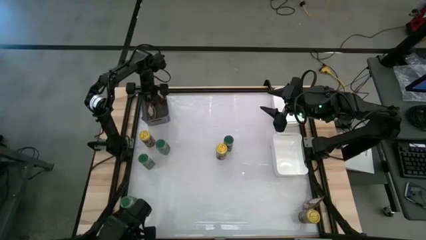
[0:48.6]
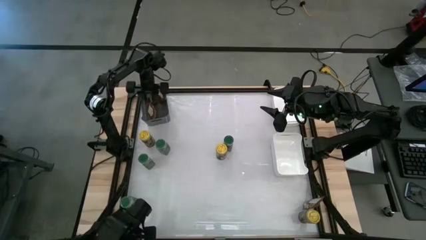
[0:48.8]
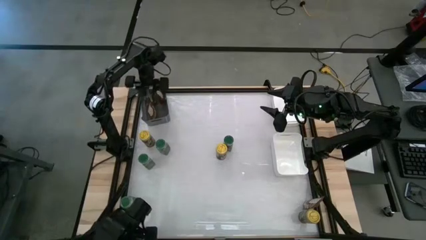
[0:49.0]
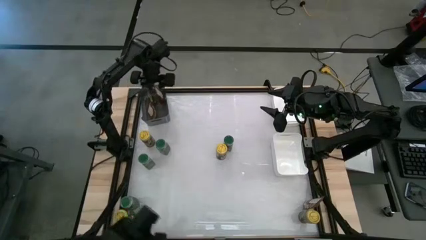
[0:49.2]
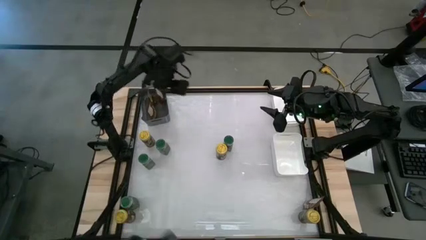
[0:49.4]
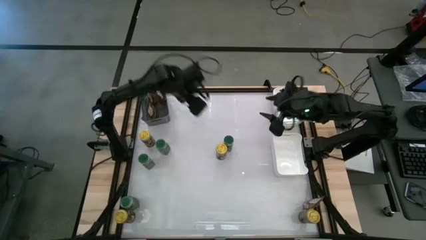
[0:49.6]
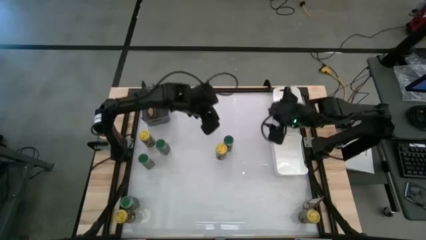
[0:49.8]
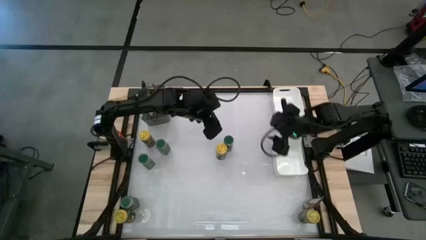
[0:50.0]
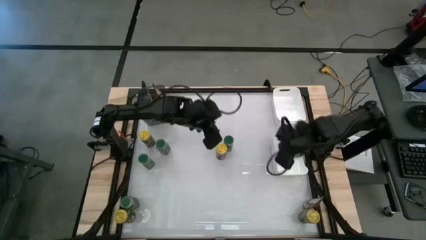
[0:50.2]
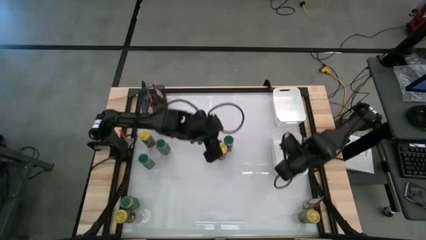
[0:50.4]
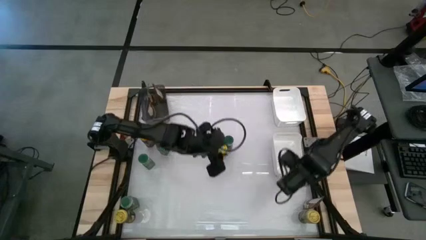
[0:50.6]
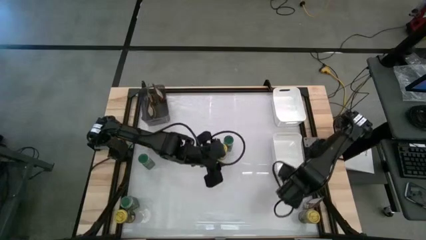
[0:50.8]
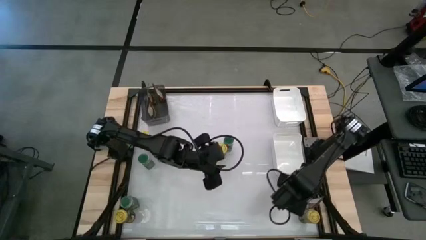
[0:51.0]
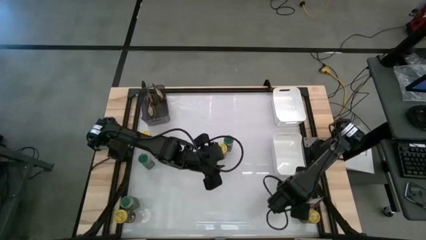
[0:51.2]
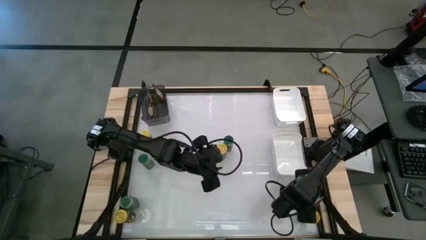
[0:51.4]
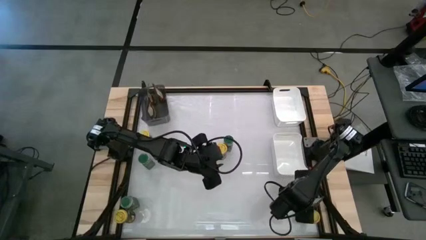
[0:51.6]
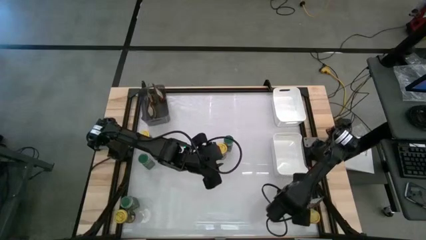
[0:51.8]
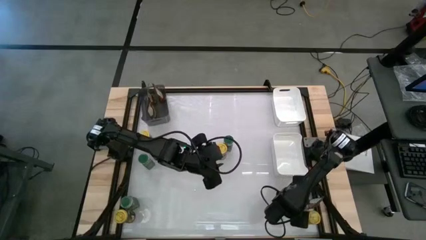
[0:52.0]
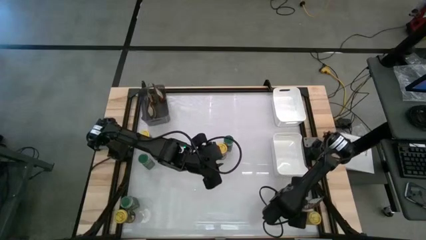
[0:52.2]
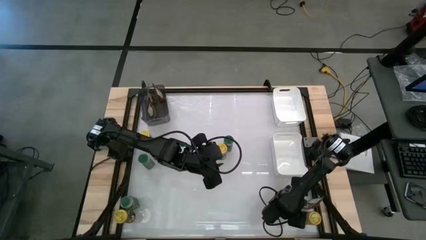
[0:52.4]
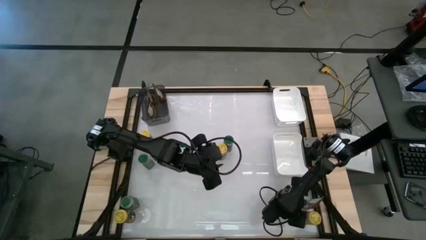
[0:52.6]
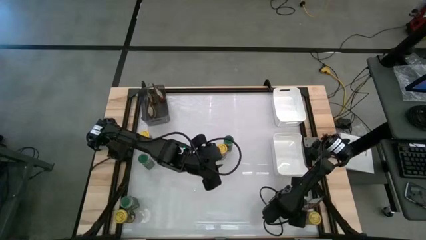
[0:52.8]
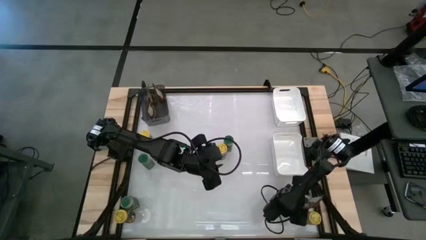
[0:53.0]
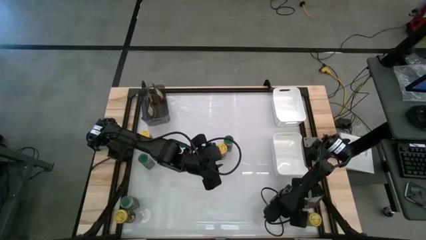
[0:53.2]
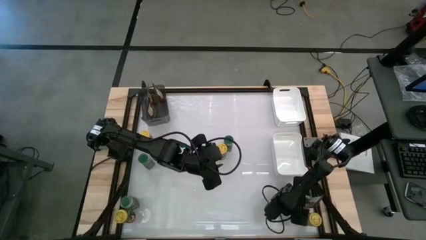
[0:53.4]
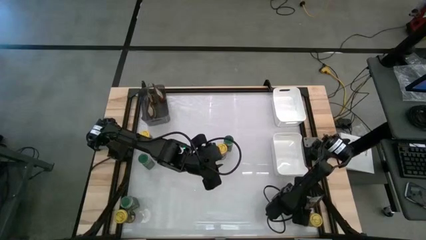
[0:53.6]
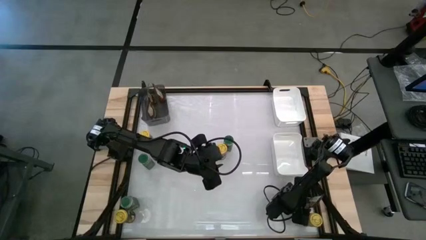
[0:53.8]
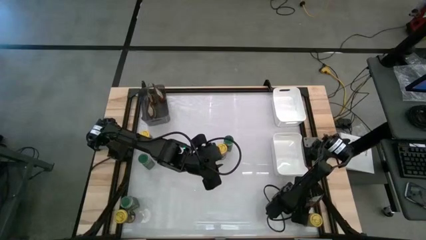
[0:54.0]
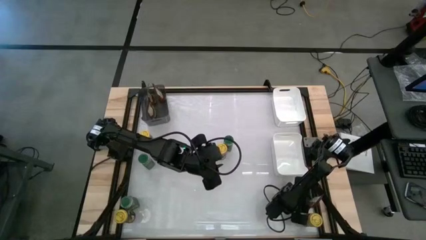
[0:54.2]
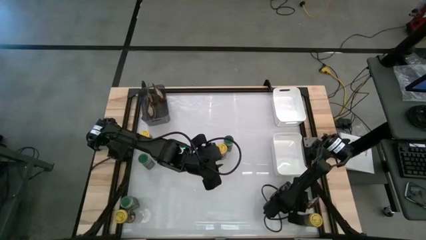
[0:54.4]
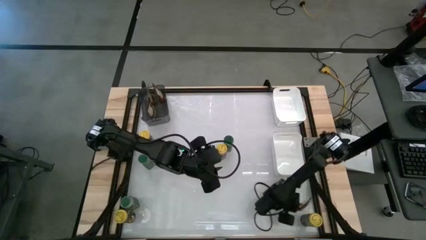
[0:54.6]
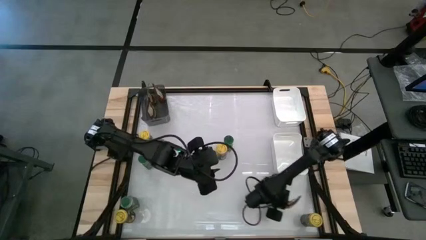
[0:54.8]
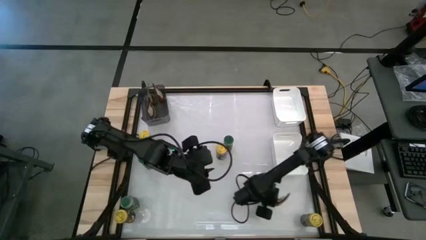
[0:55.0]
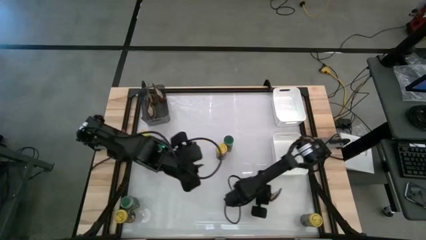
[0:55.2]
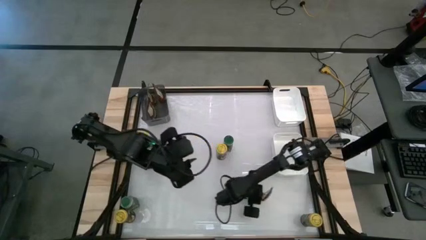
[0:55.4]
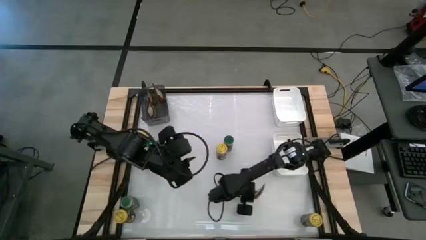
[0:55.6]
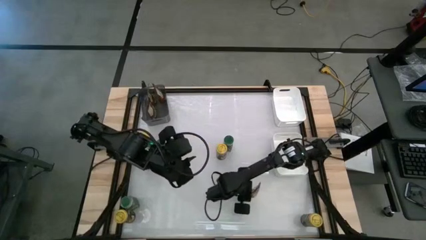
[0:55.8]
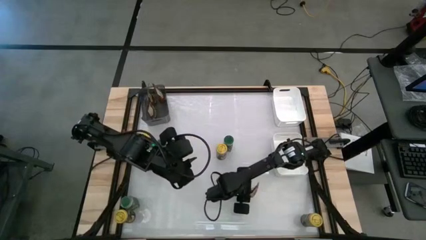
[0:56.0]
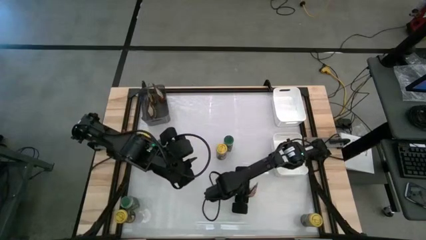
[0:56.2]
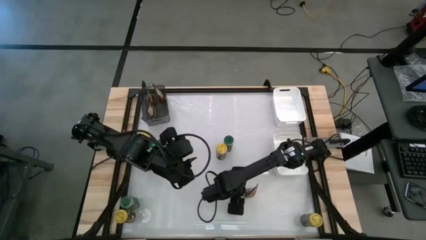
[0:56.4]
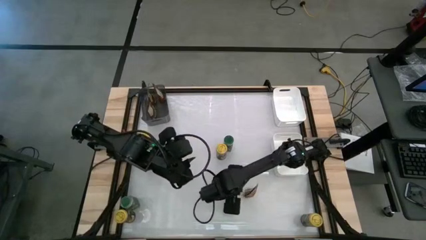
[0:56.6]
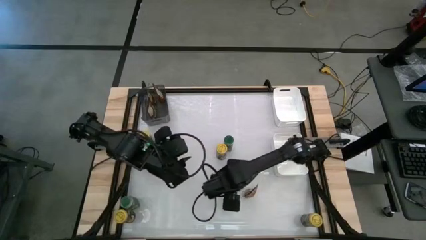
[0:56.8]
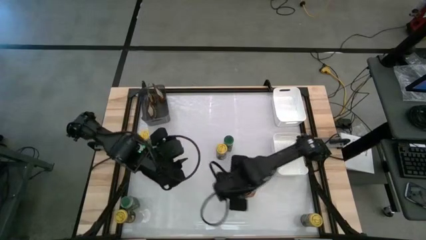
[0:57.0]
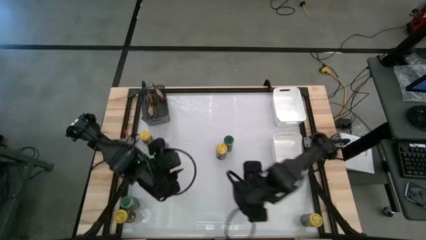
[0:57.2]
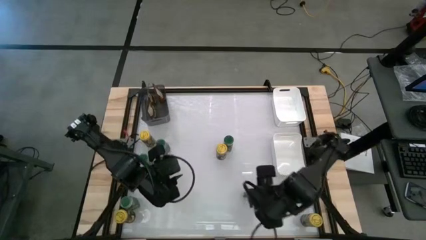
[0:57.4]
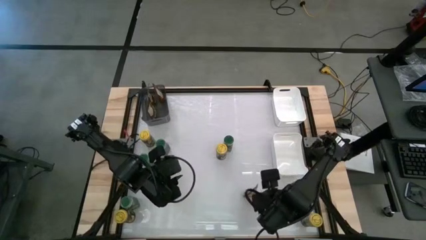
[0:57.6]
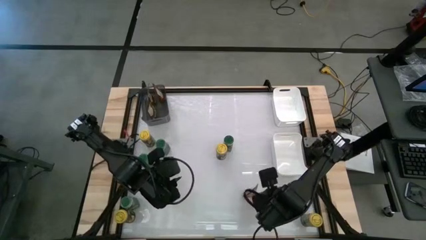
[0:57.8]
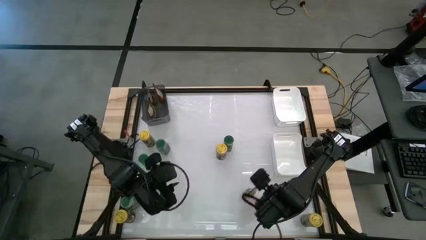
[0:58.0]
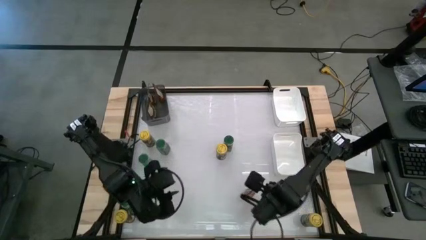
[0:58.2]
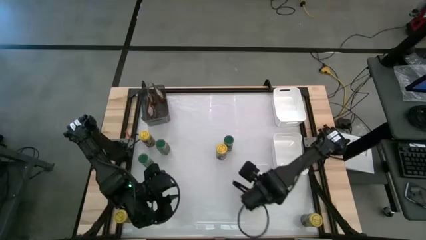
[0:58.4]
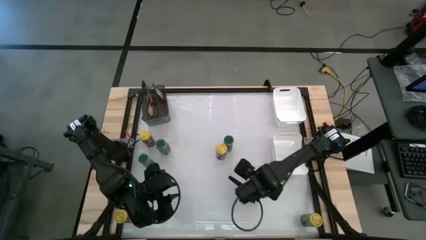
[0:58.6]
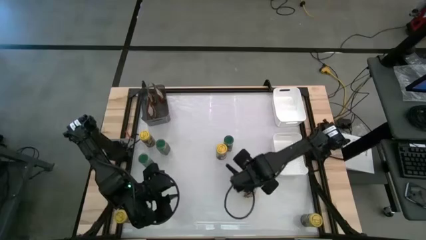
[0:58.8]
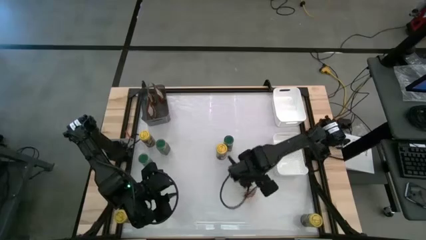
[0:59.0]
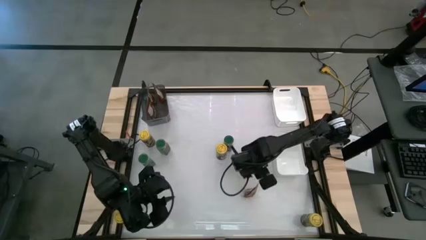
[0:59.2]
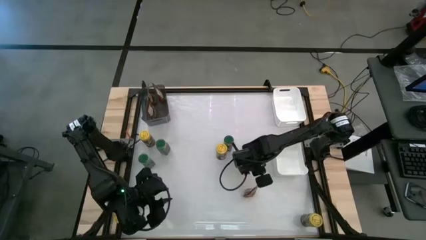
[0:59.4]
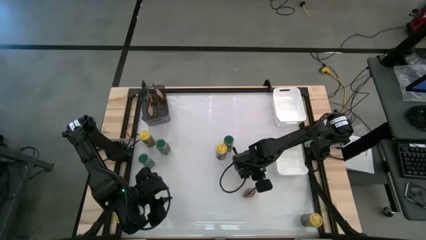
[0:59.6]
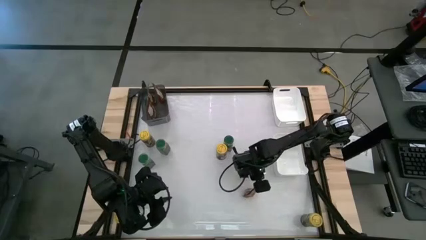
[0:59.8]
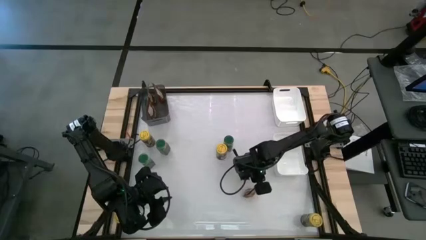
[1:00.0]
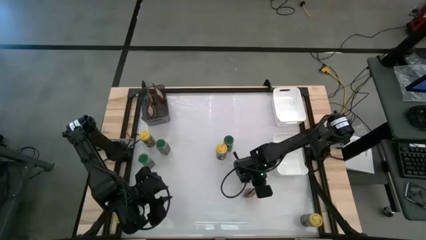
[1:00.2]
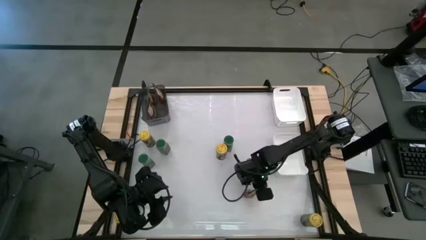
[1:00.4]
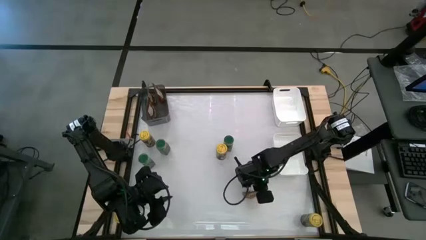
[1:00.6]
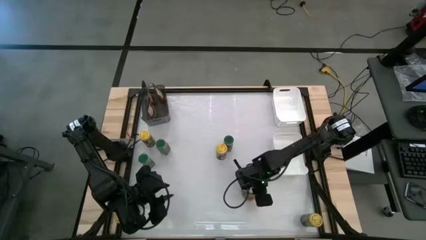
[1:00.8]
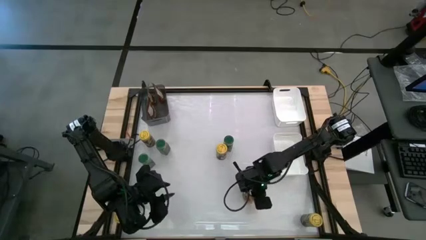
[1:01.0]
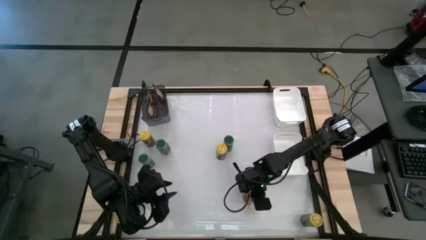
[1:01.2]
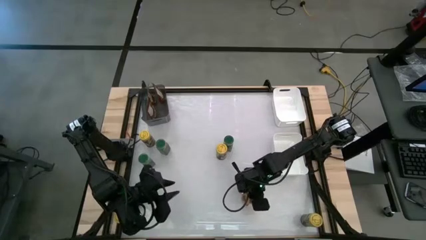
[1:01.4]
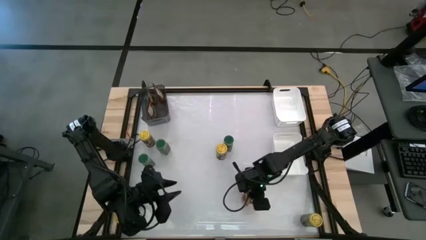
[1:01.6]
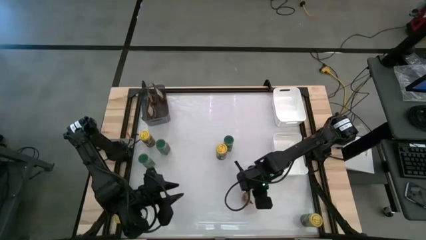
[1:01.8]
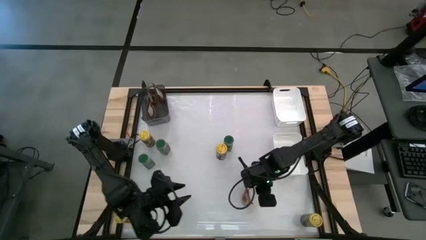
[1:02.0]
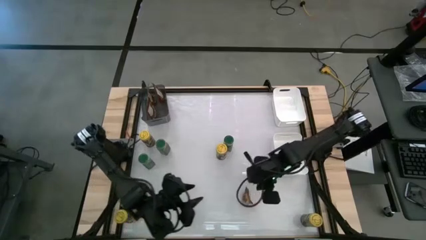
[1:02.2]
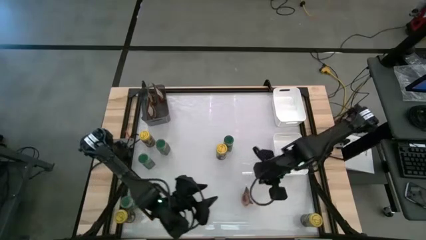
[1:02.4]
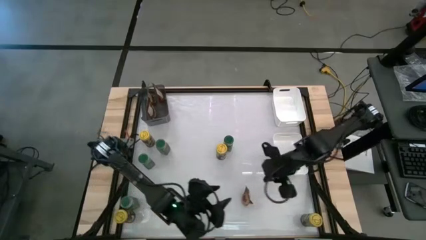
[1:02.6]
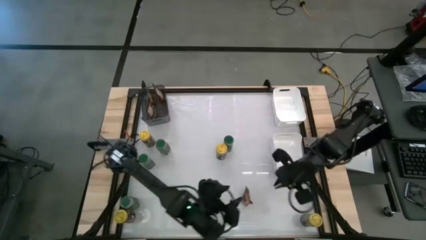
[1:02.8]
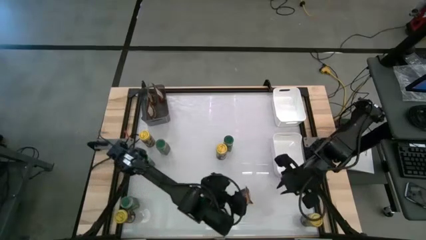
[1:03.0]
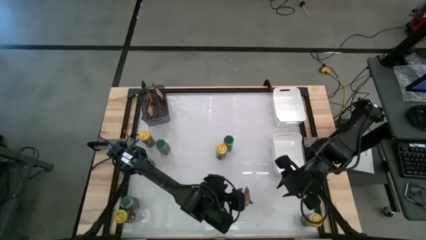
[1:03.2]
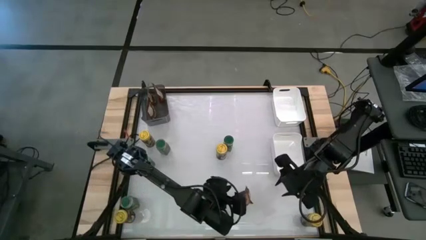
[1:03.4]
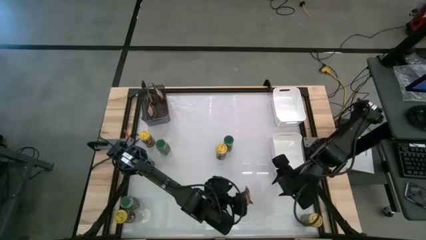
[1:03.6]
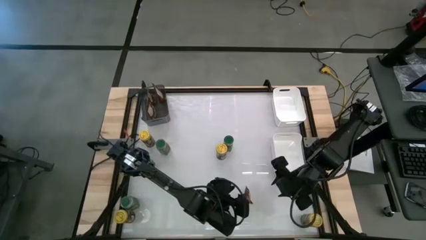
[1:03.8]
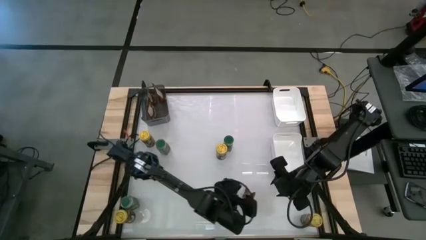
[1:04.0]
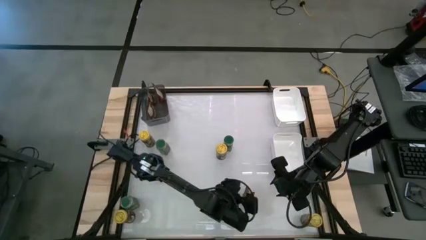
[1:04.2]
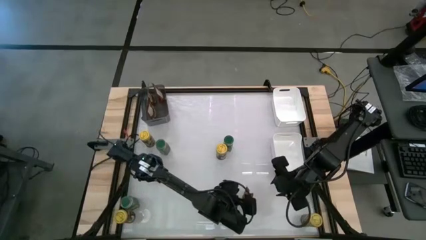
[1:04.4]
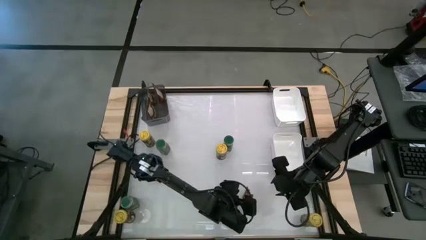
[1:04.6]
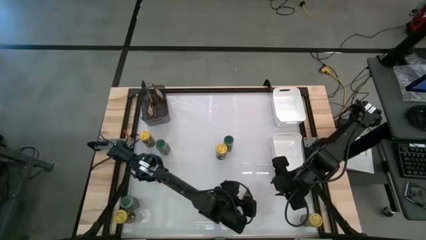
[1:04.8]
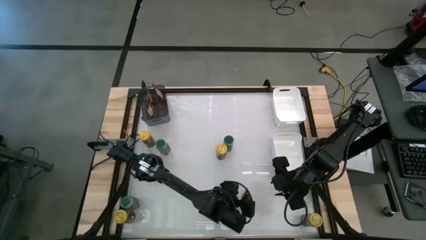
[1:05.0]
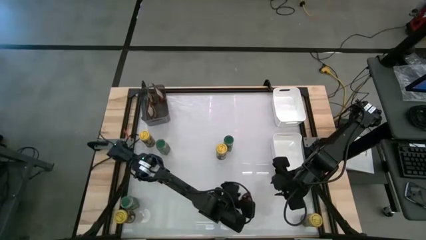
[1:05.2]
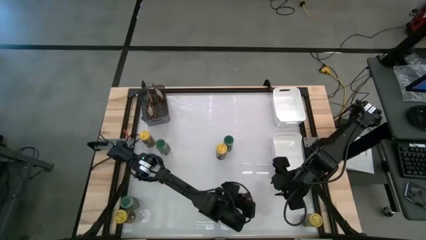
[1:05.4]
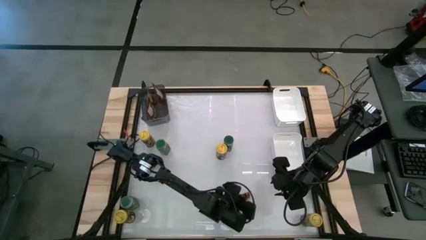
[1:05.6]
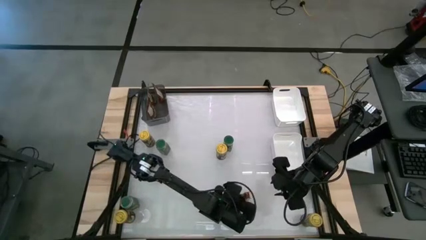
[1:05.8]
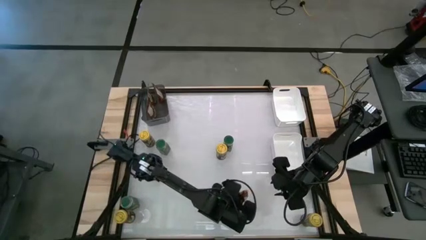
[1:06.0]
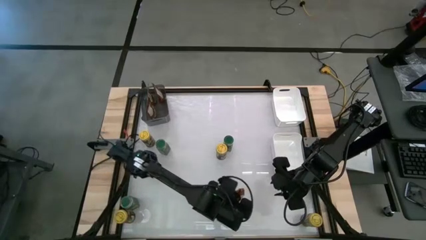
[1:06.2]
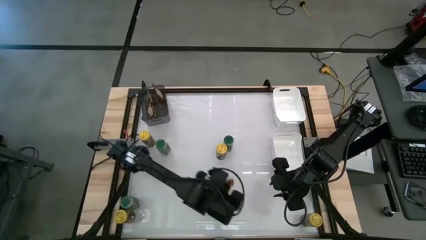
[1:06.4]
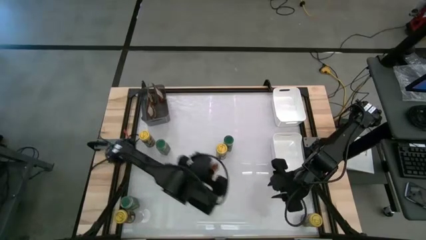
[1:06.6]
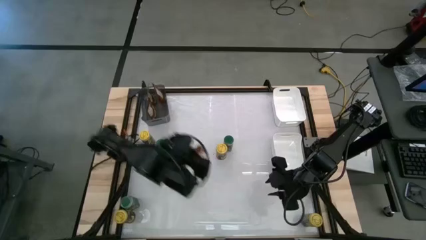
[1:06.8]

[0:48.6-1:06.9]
Task: Sort spices by type
Put the orange seasoning bag into the black bin
